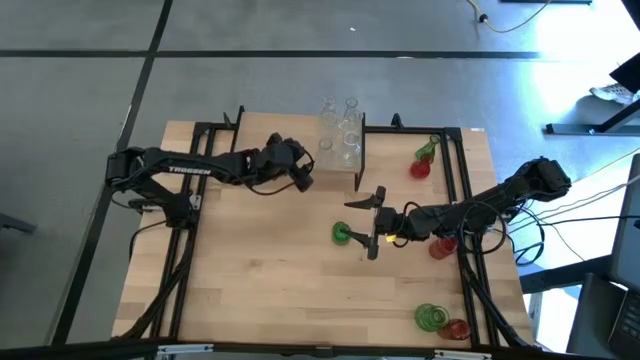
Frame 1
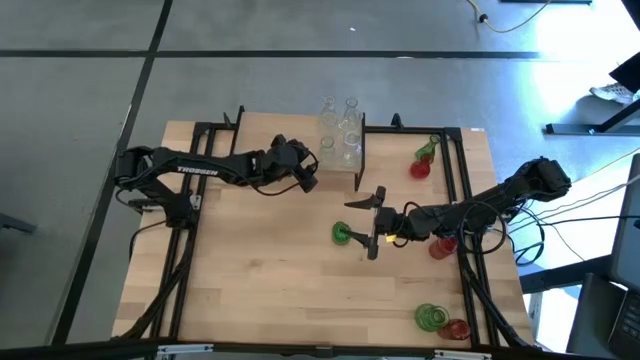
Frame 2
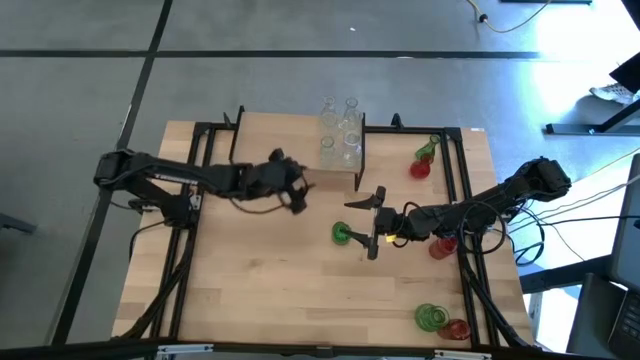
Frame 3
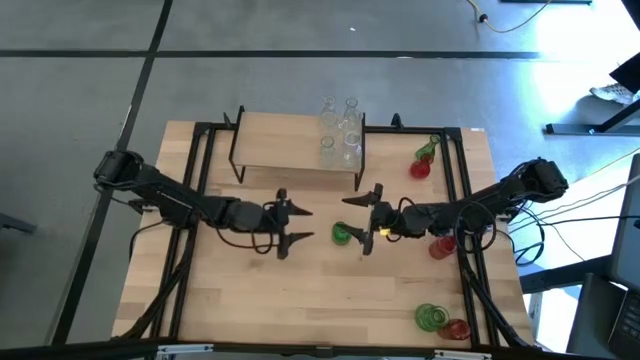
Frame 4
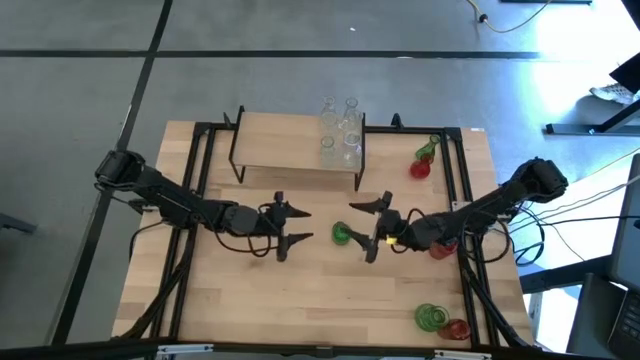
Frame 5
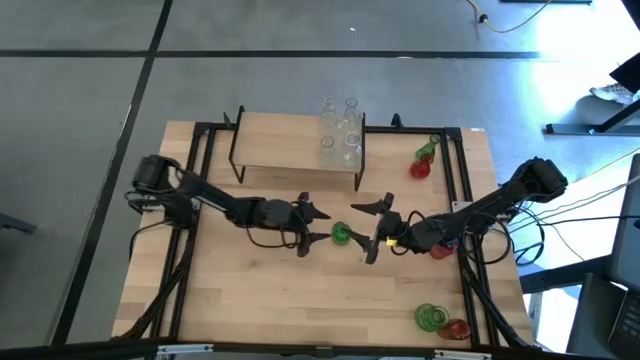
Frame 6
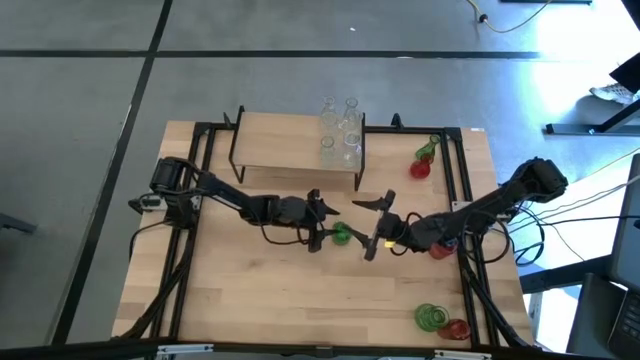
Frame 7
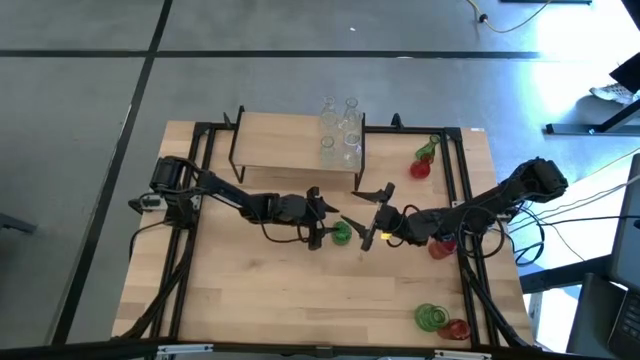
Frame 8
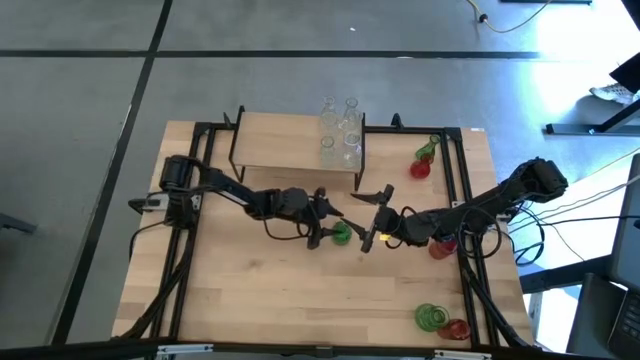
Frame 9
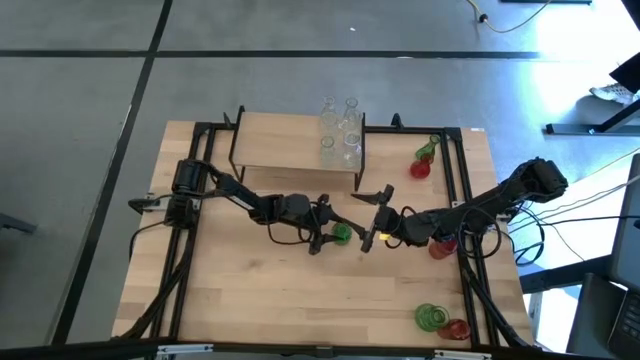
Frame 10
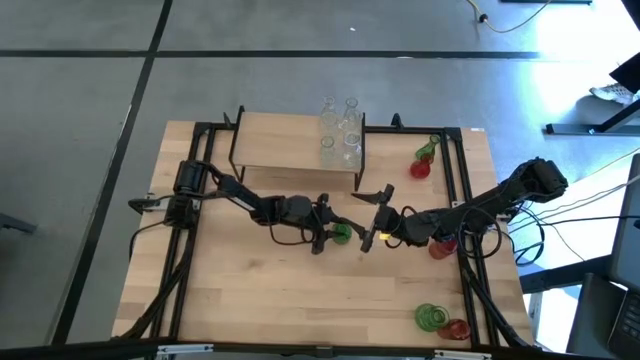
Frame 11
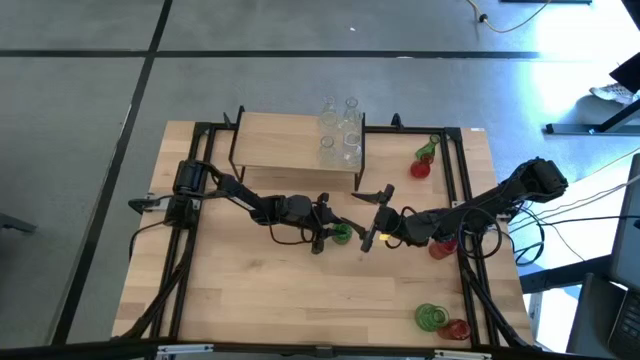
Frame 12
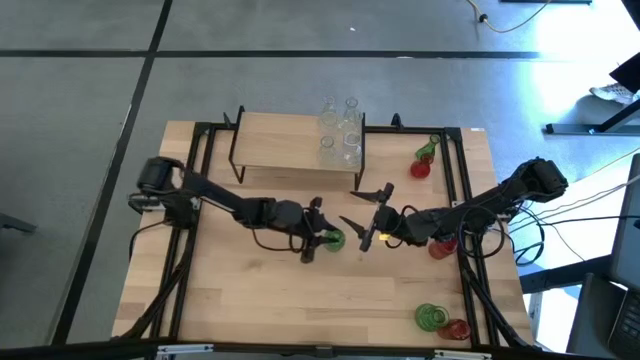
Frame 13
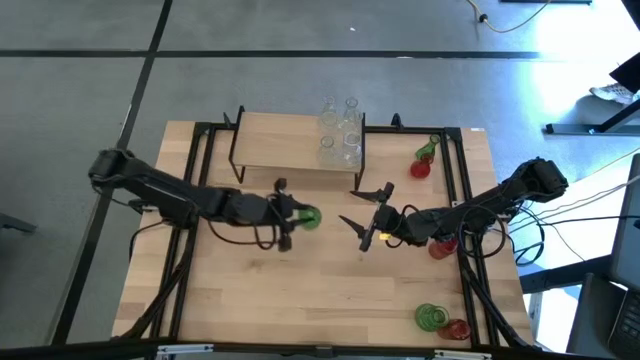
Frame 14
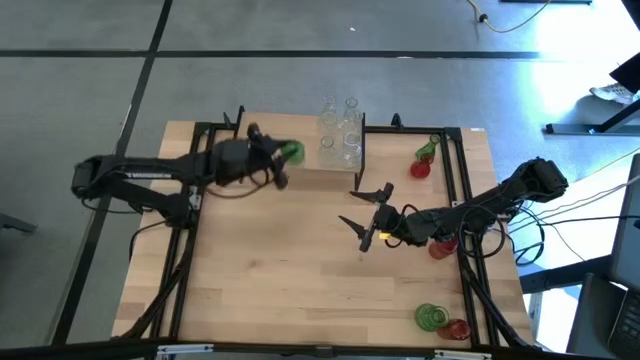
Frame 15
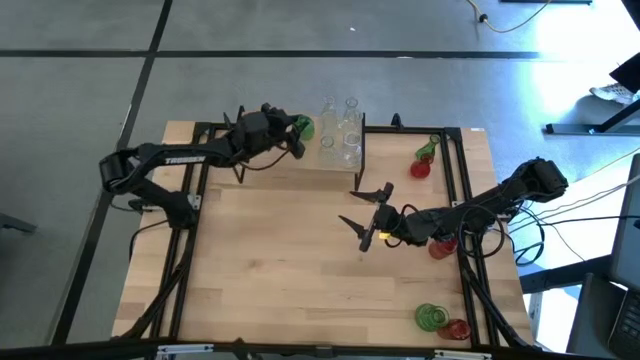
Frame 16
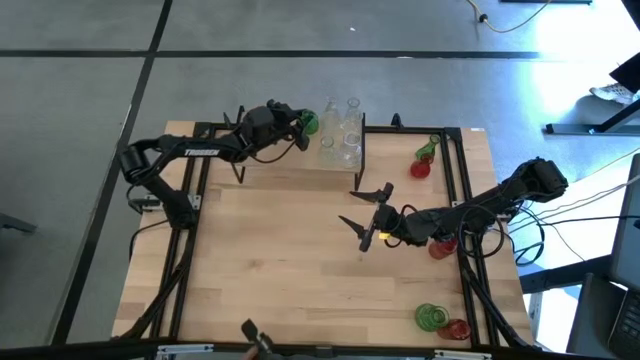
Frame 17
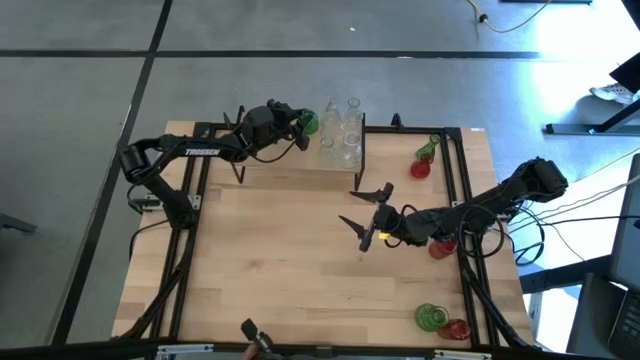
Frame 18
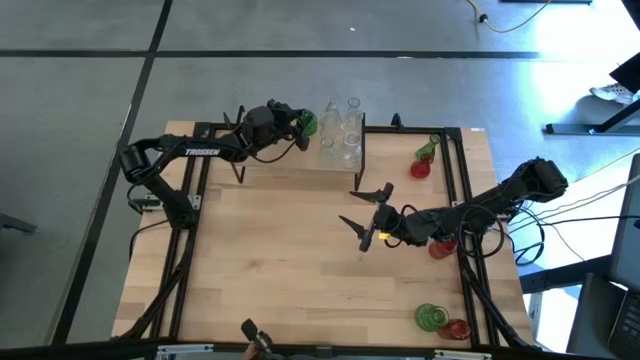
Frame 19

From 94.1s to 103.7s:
Task: sort vases onto shelf
Put the middle green vase on the shelf

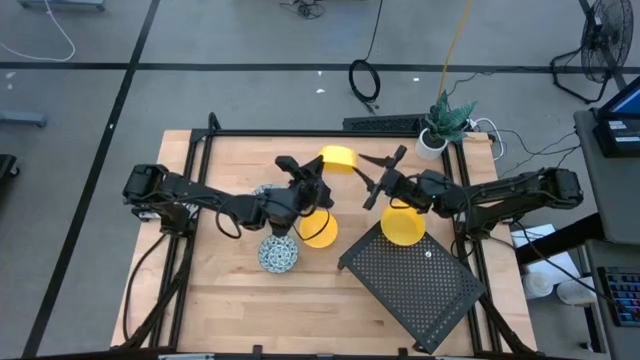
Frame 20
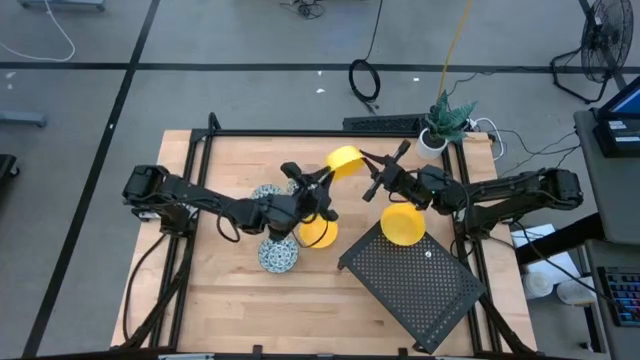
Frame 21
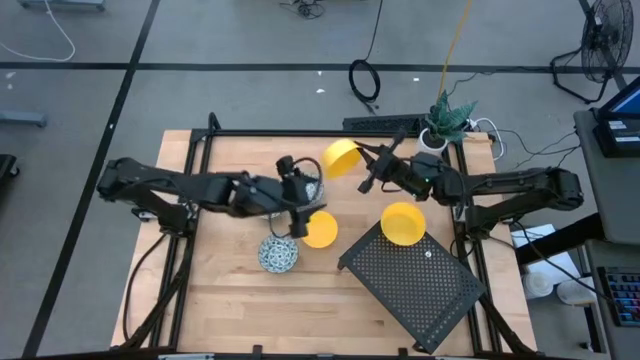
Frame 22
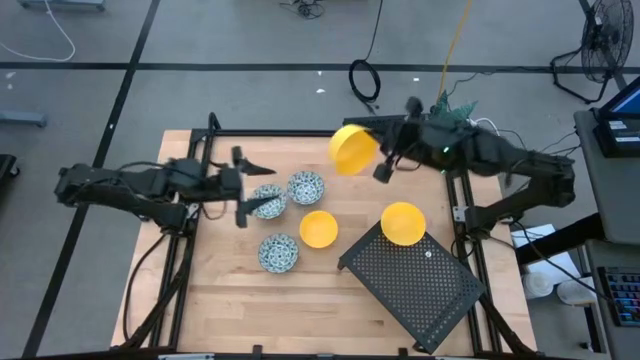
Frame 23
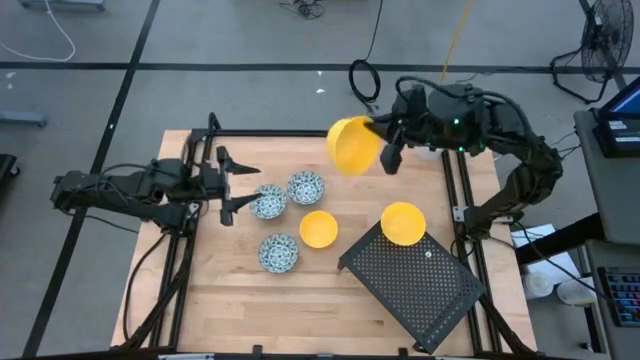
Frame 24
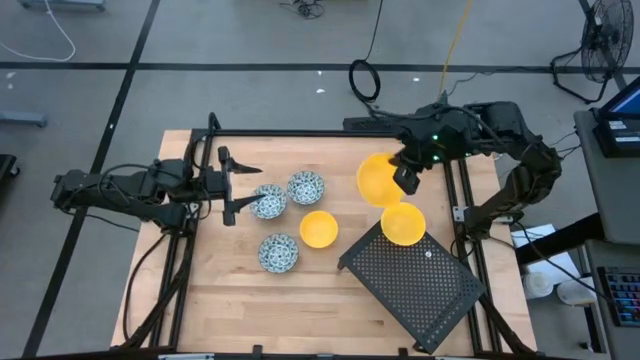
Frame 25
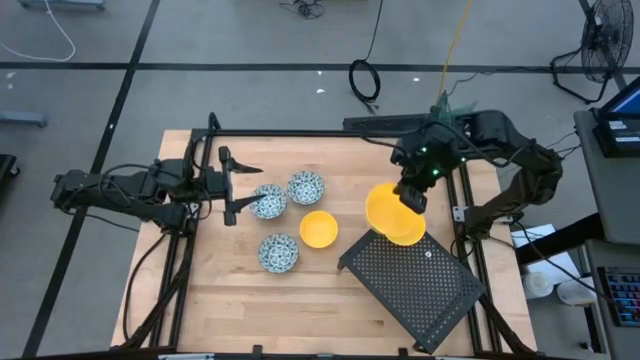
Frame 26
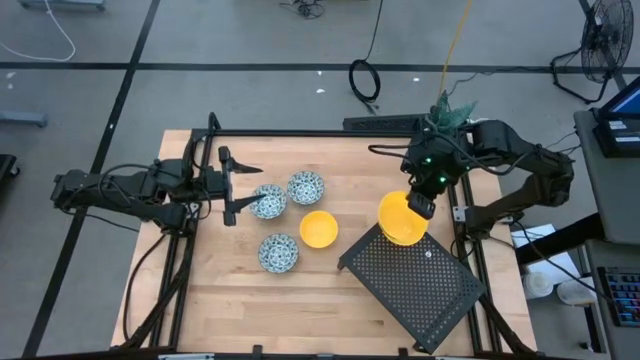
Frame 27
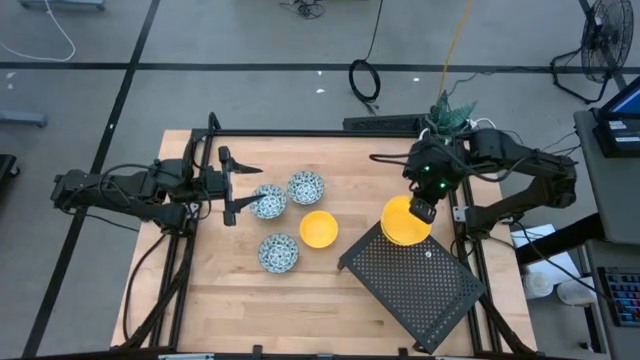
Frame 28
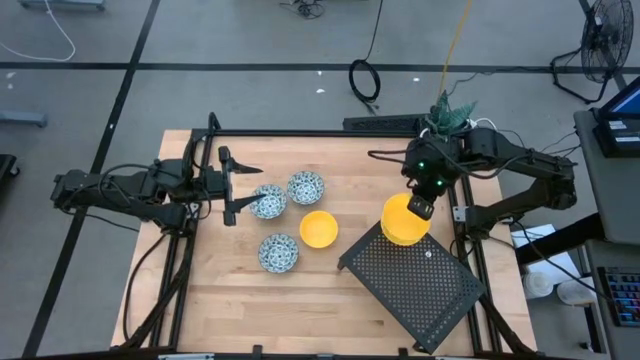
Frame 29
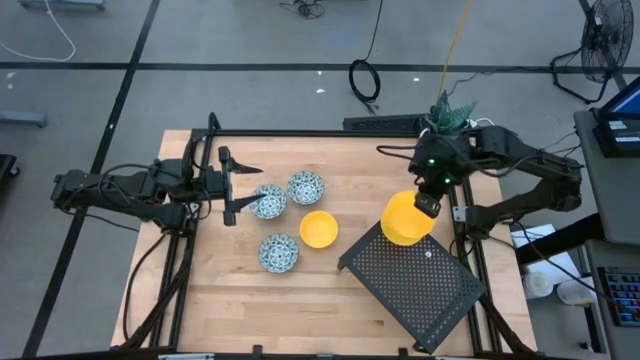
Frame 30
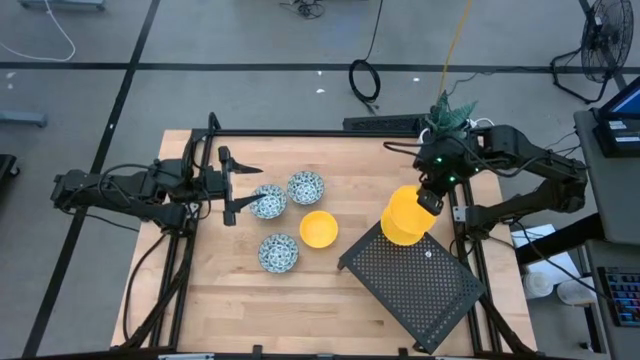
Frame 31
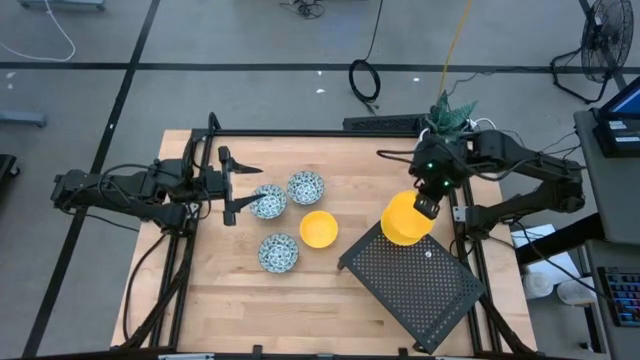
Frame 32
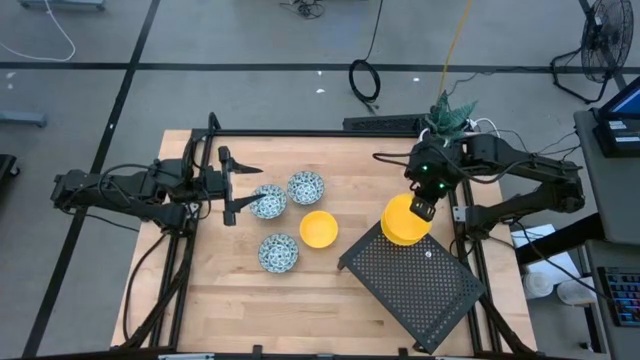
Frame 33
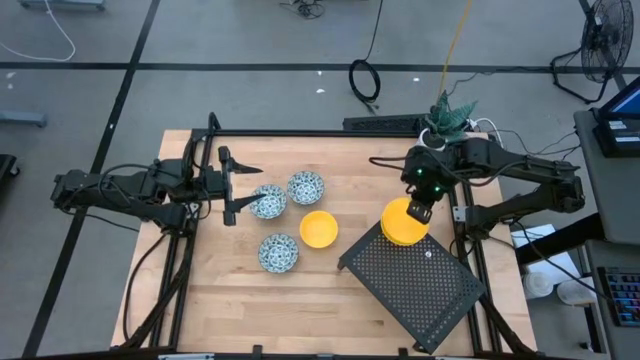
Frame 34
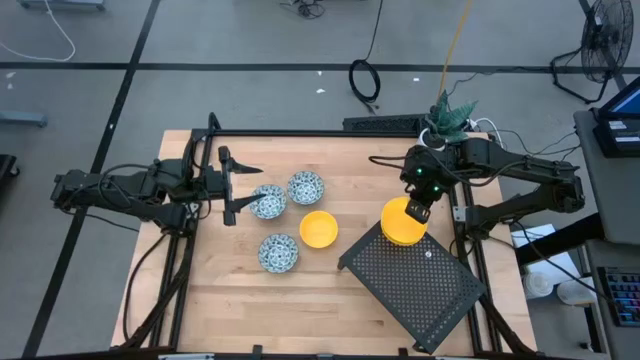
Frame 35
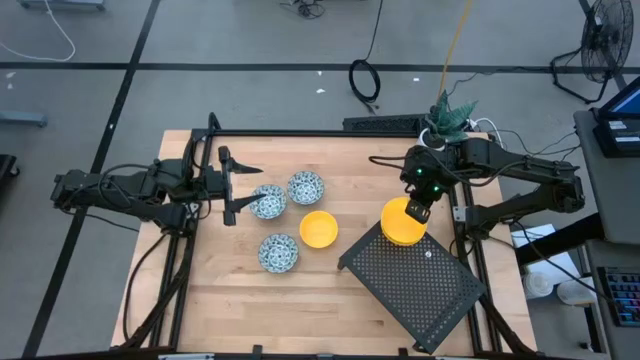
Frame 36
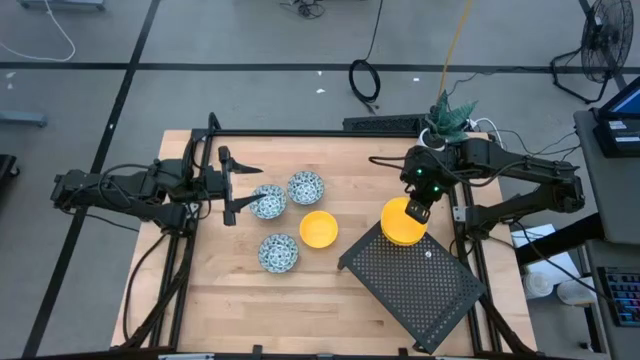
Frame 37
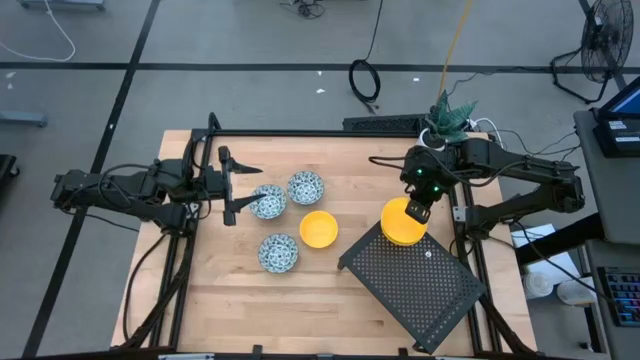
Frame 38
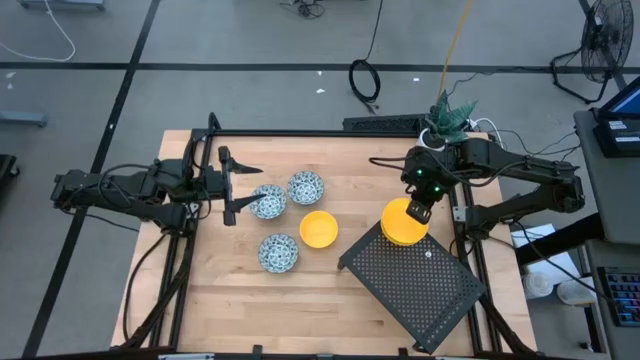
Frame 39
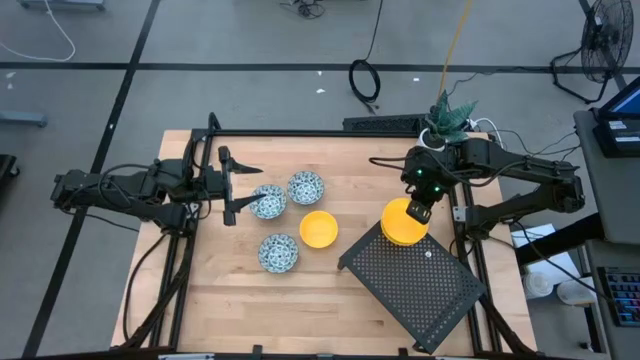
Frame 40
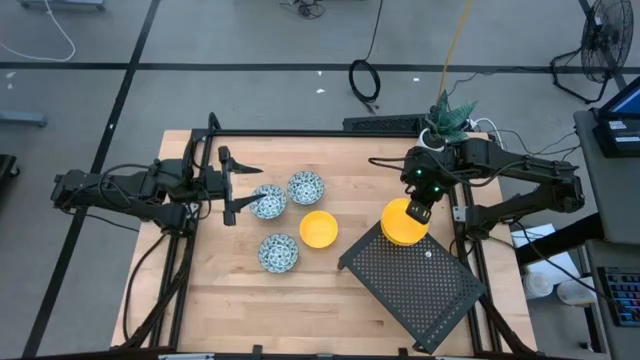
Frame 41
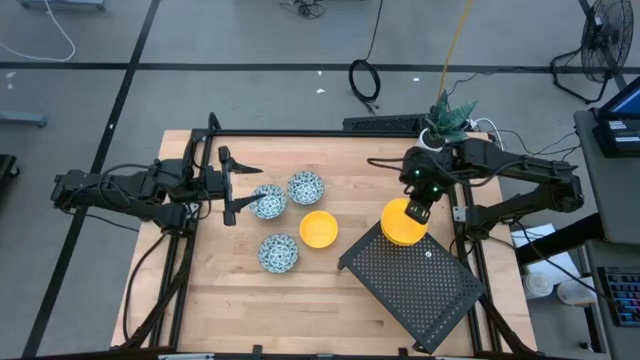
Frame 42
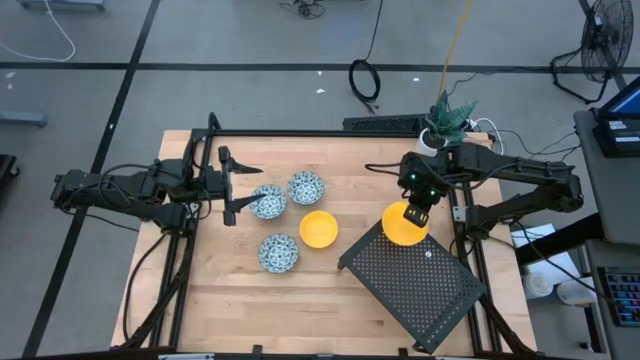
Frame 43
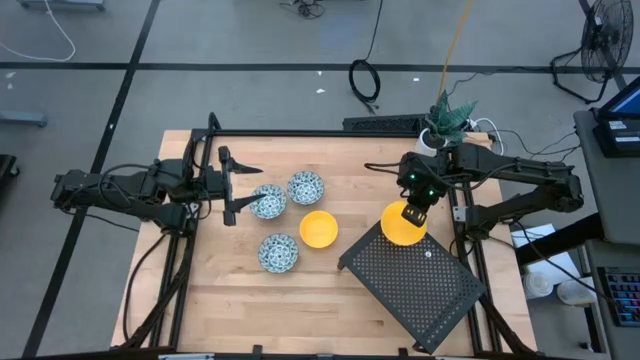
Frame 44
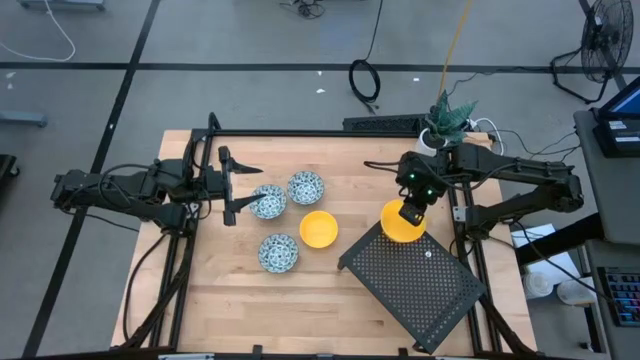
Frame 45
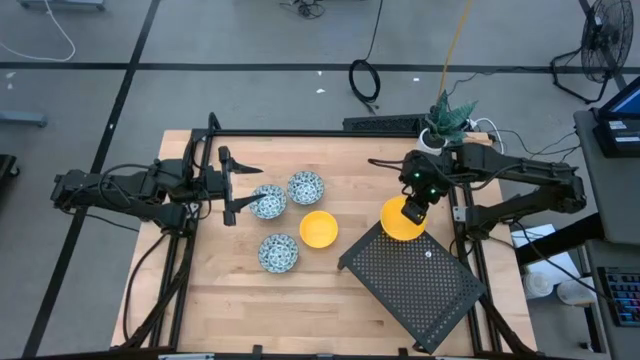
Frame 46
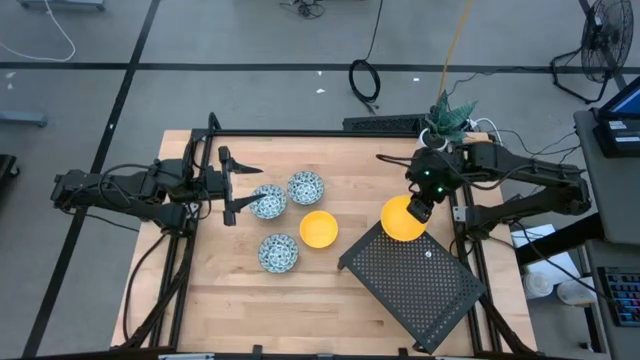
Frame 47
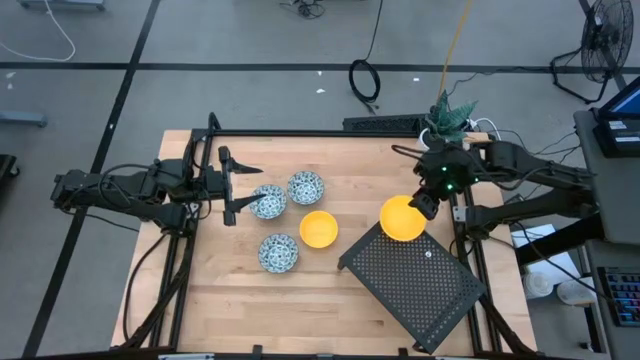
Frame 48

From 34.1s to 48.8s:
Task: Pick & Place Mini bowls
Stack the left yellow bowl on top of the yellow bowl on the shelf
